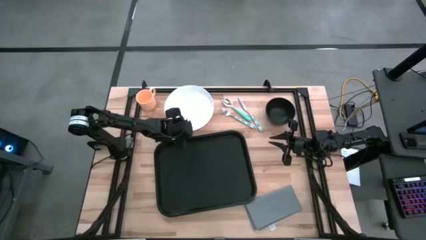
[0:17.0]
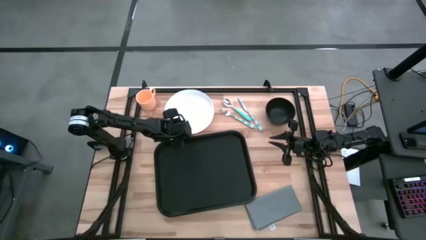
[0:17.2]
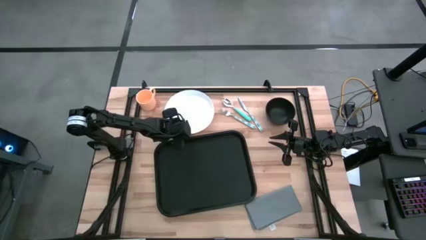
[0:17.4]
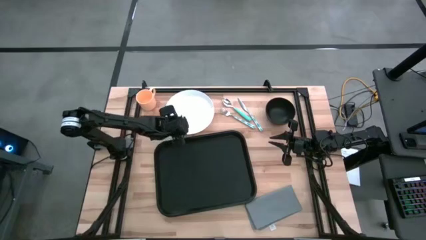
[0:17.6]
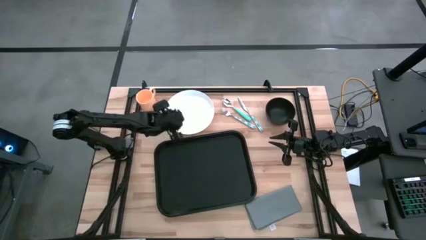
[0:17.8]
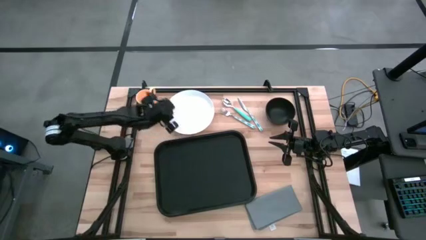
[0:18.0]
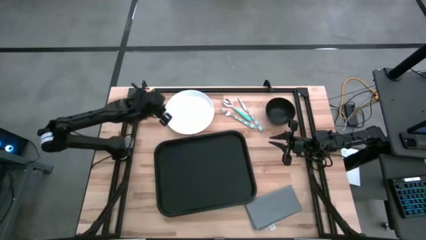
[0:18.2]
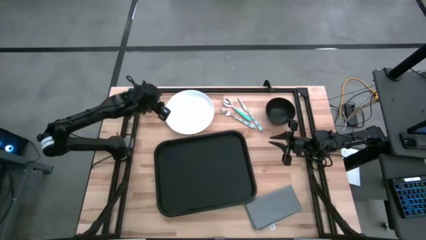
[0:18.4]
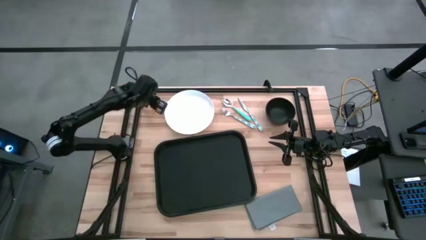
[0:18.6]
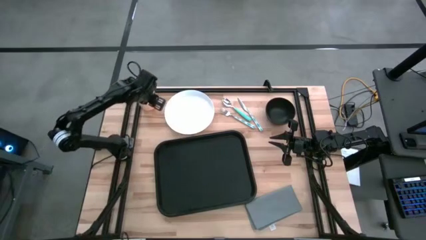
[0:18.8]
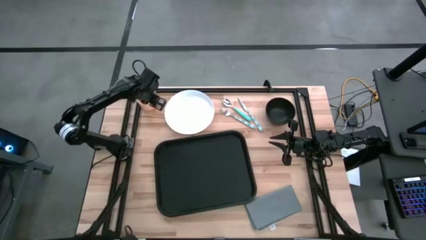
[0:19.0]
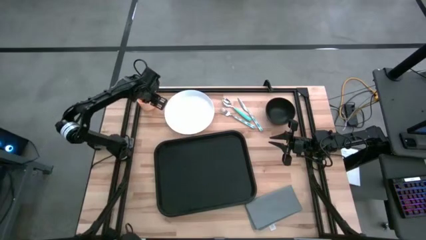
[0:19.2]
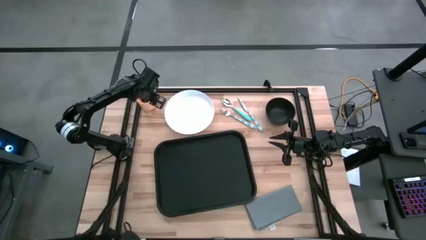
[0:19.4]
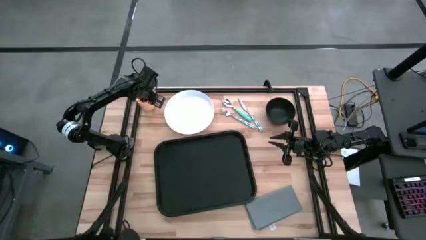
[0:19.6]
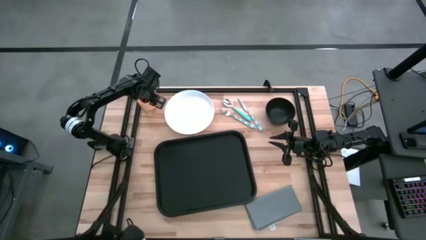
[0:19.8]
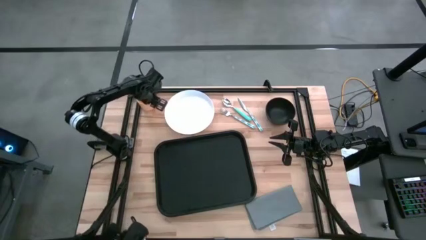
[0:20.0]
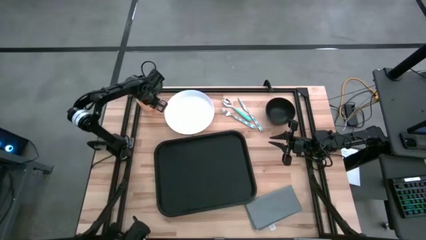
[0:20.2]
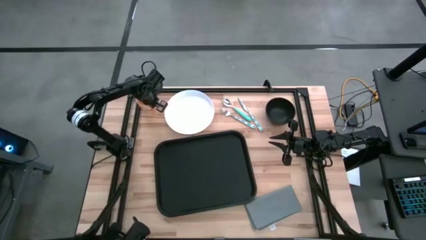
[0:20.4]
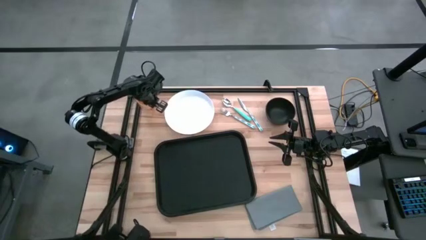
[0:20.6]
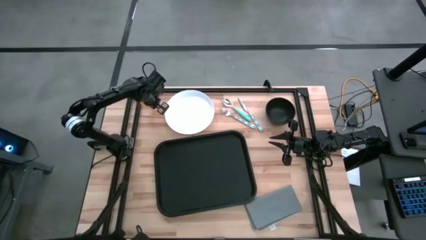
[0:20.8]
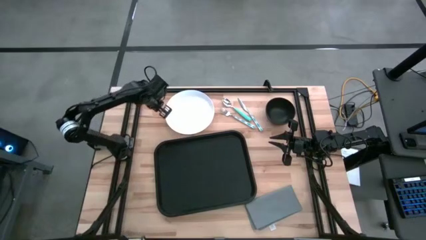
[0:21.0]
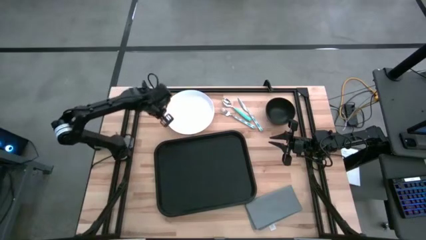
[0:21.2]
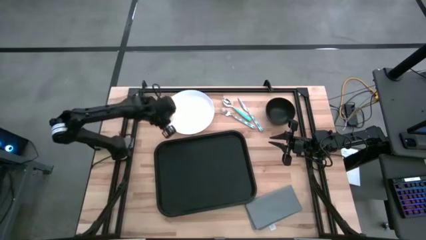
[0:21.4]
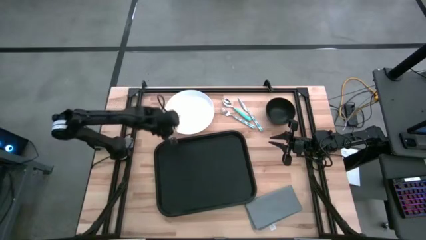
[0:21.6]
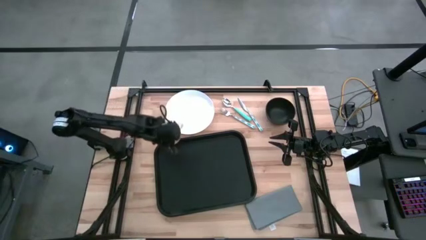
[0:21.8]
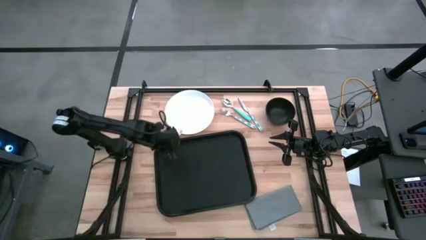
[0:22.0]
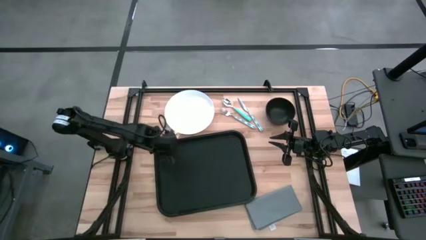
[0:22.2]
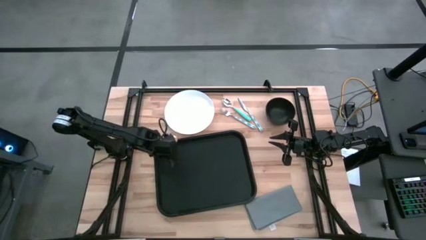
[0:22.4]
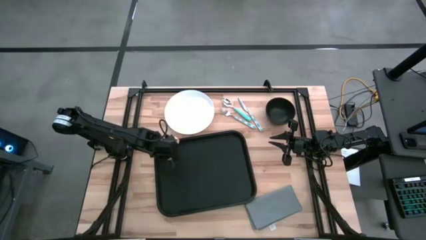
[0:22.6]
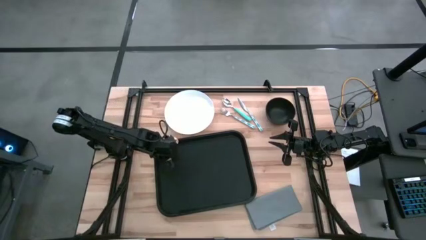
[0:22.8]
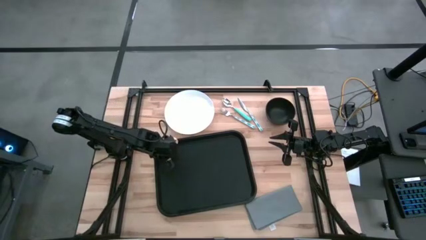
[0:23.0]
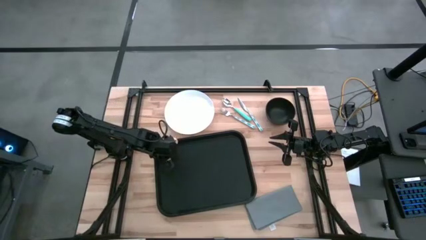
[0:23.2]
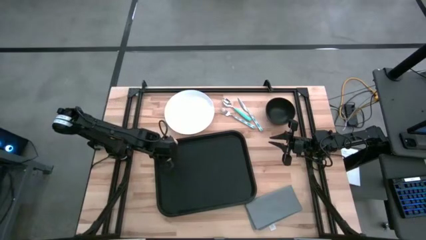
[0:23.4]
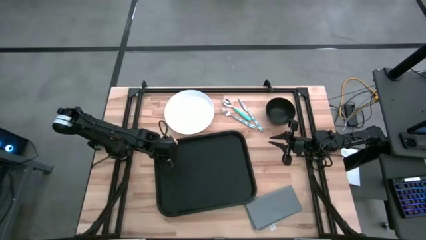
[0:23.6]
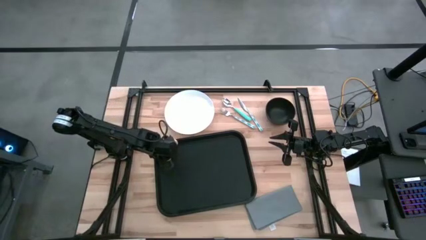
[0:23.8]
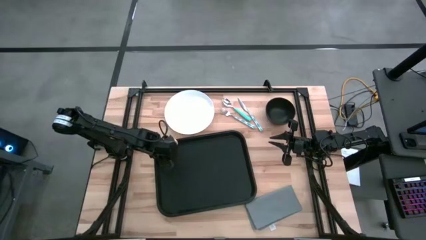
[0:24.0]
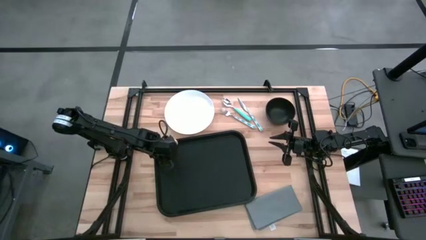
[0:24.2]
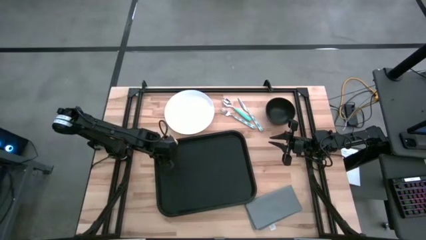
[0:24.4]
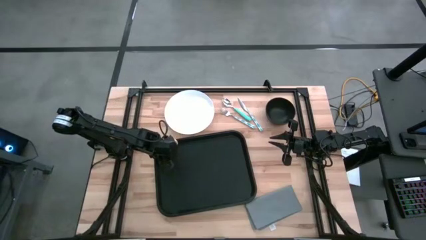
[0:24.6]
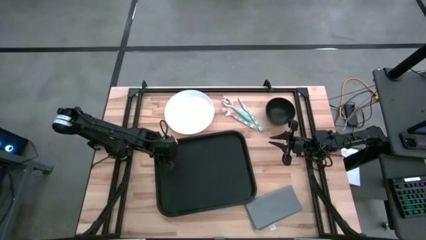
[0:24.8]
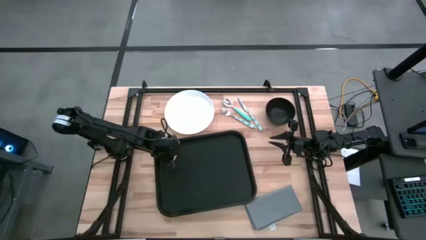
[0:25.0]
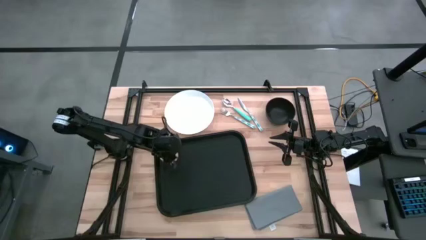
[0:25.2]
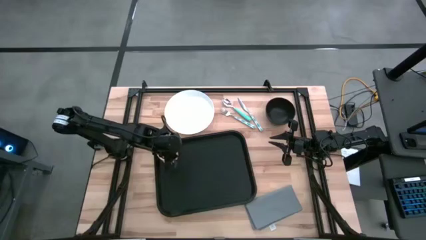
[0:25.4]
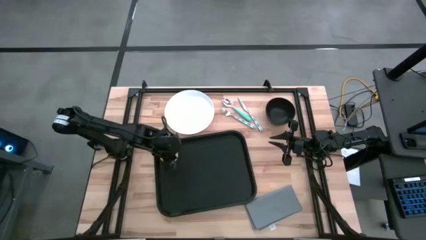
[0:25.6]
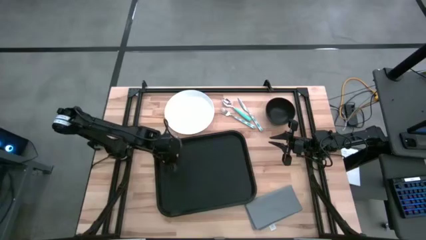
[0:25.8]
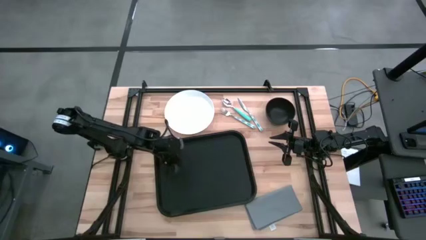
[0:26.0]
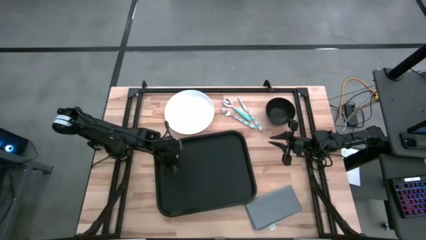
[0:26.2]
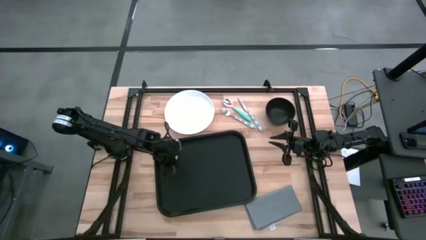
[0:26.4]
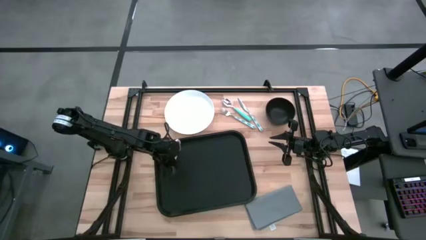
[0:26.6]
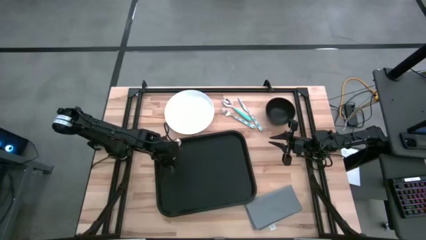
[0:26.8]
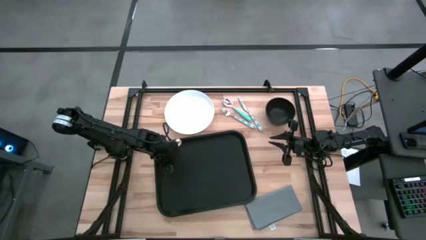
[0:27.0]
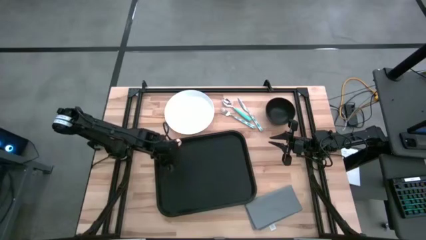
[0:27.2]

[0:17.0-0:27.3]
Task: Set up tray
Put the orange mug on the top left of the black tray
